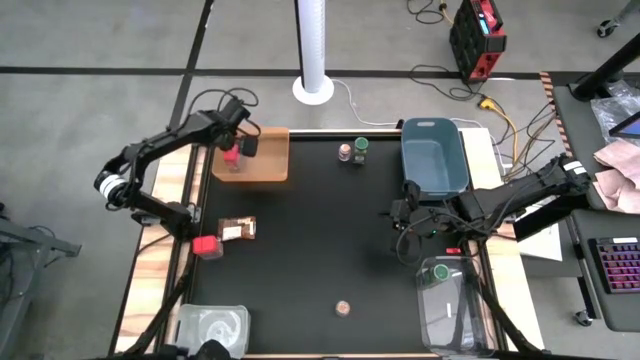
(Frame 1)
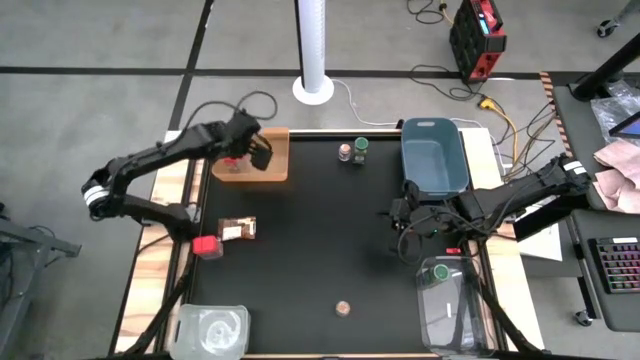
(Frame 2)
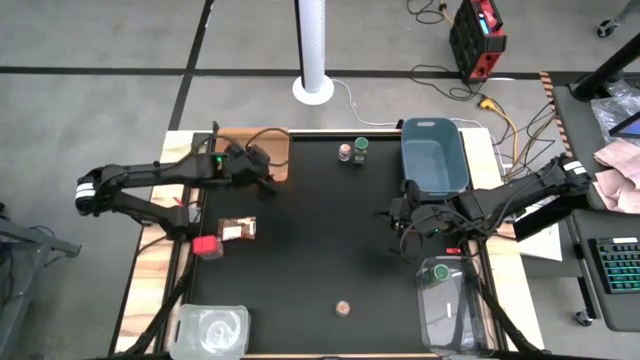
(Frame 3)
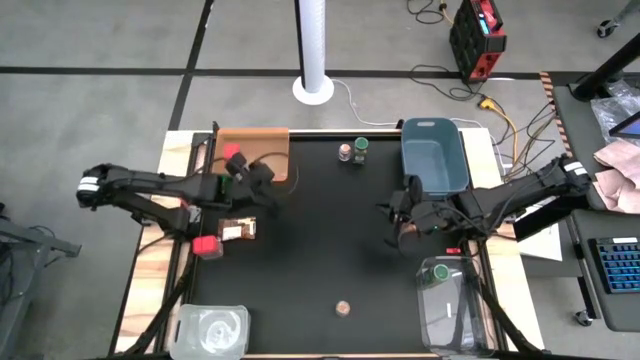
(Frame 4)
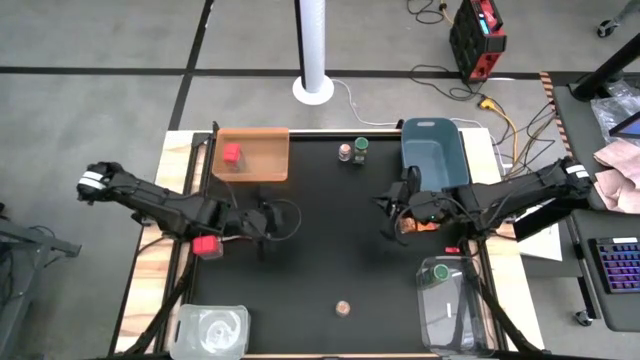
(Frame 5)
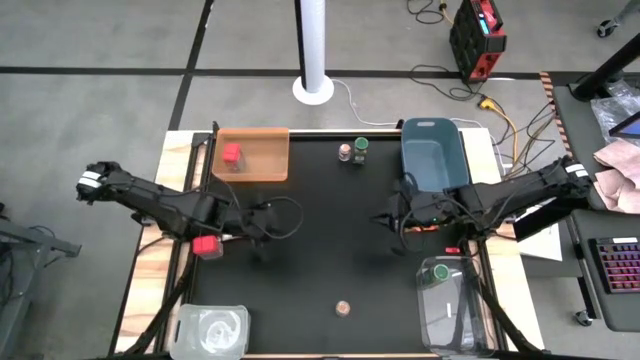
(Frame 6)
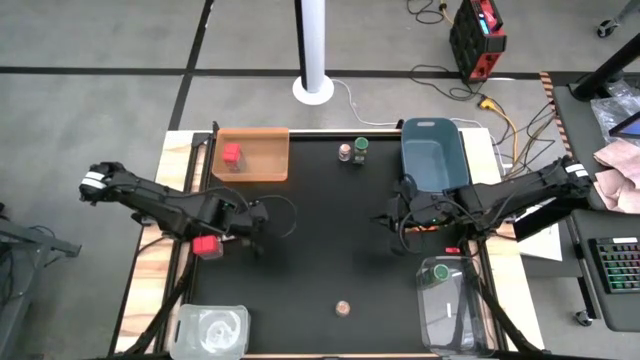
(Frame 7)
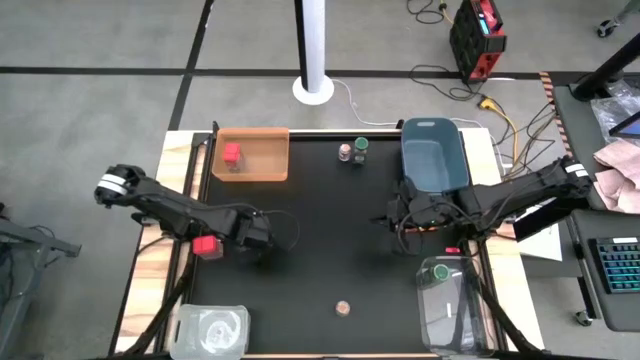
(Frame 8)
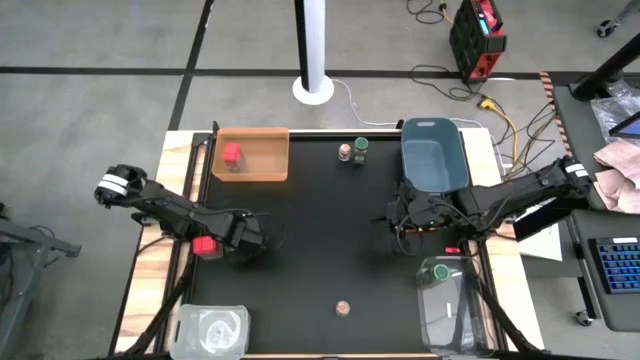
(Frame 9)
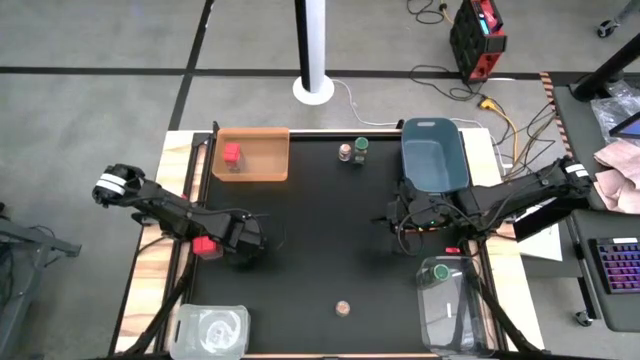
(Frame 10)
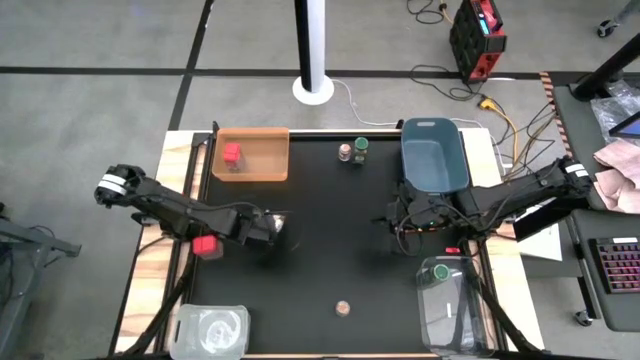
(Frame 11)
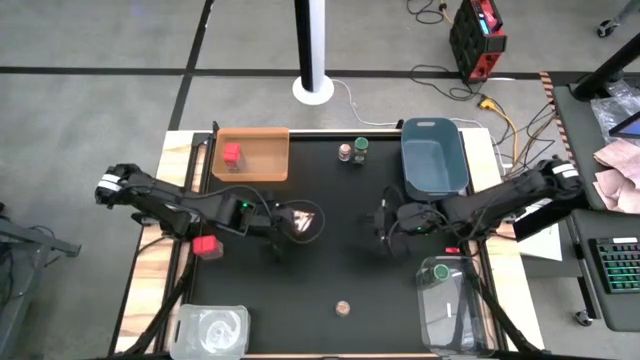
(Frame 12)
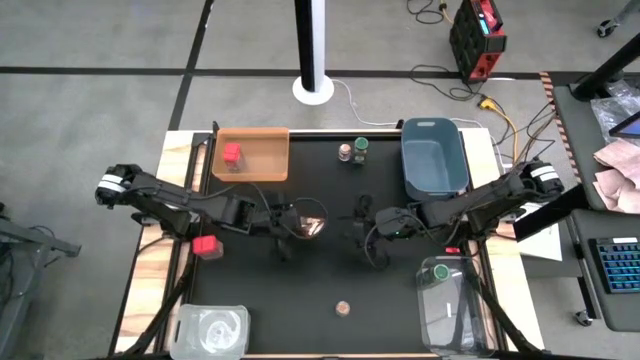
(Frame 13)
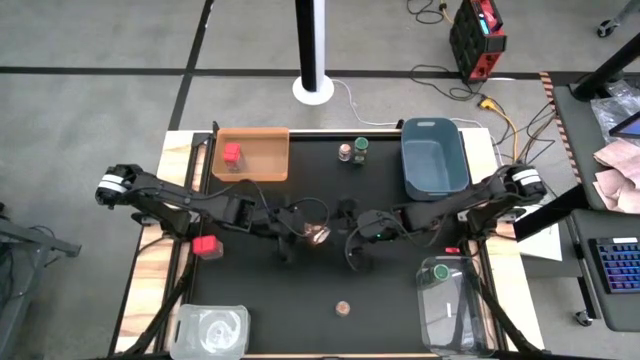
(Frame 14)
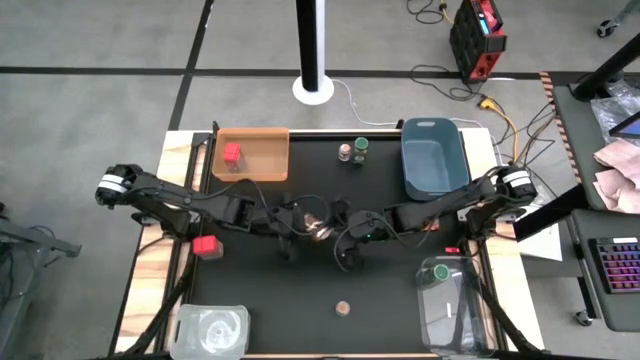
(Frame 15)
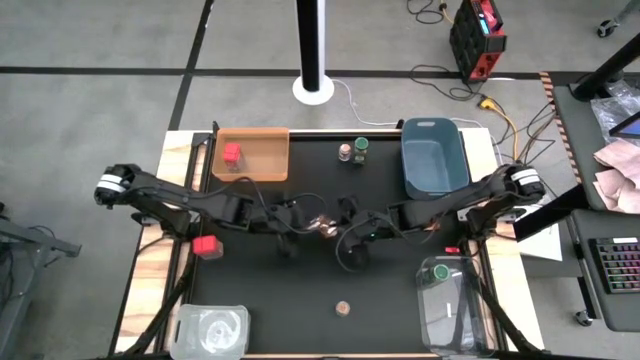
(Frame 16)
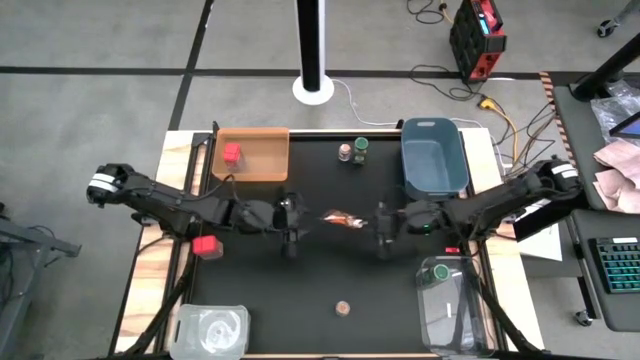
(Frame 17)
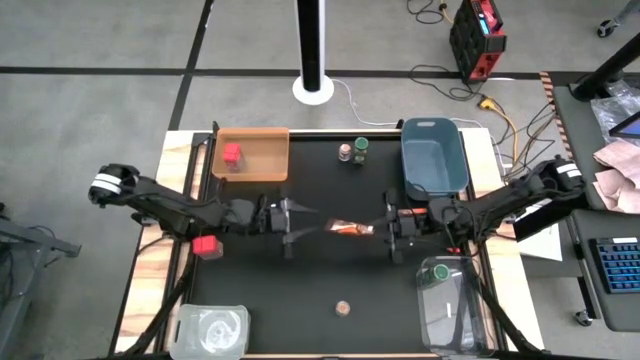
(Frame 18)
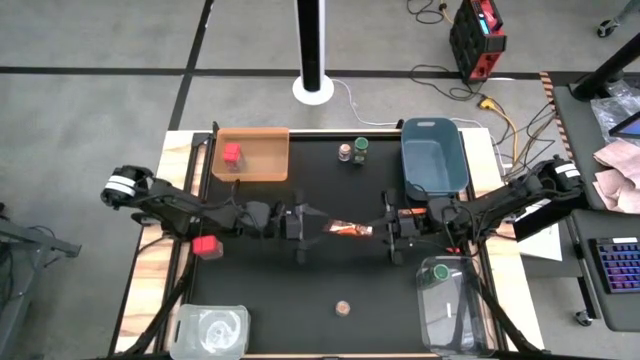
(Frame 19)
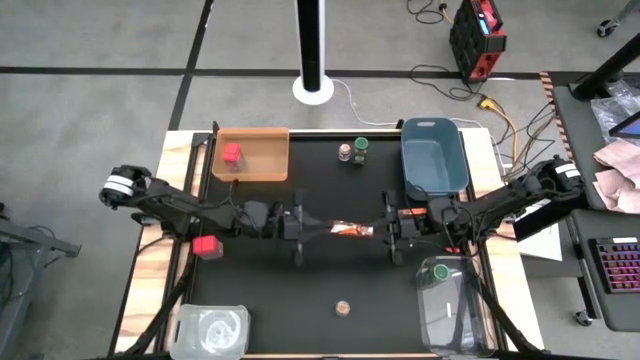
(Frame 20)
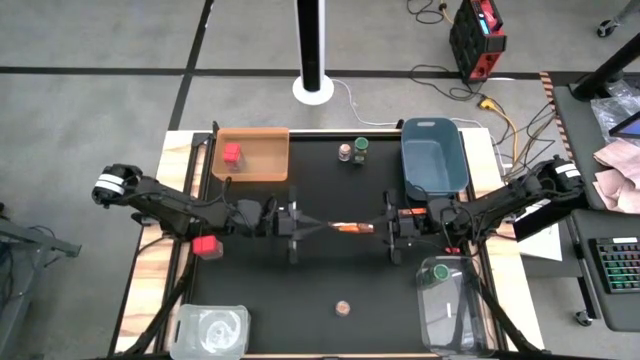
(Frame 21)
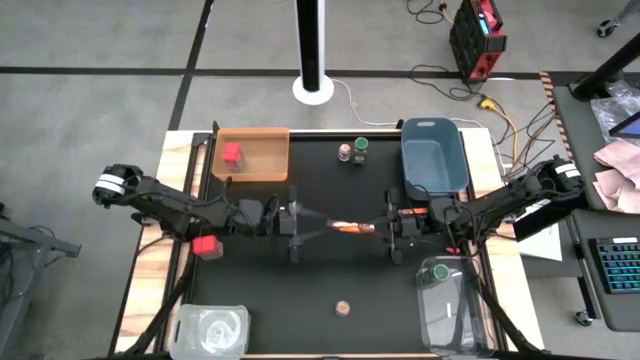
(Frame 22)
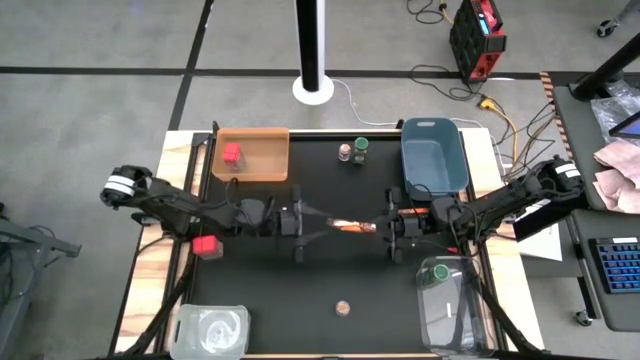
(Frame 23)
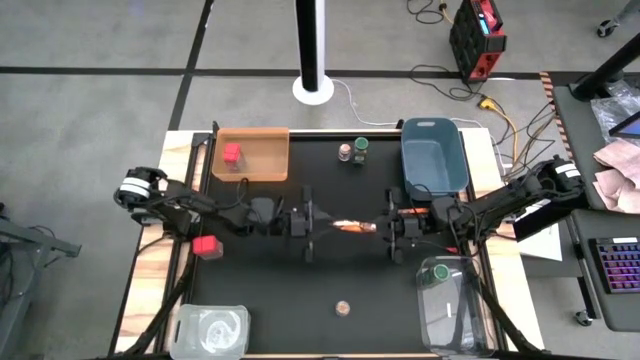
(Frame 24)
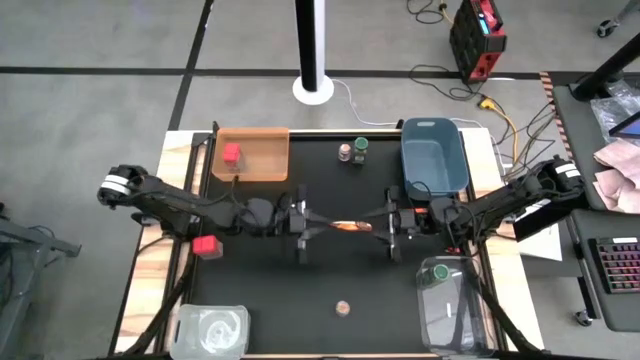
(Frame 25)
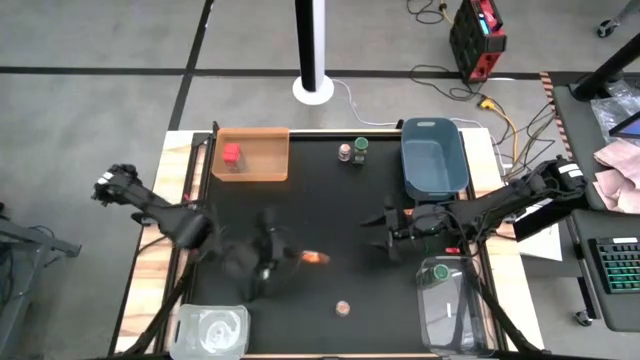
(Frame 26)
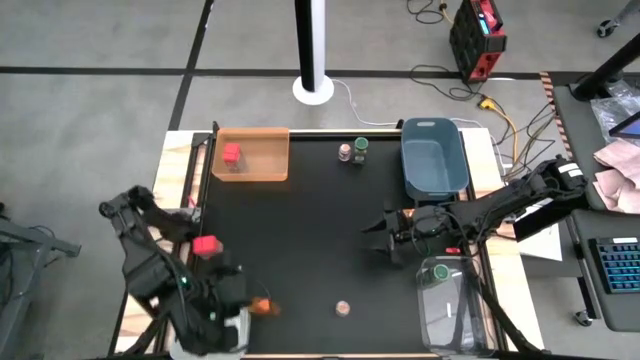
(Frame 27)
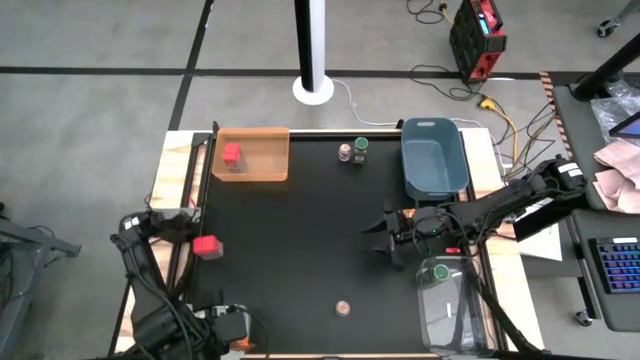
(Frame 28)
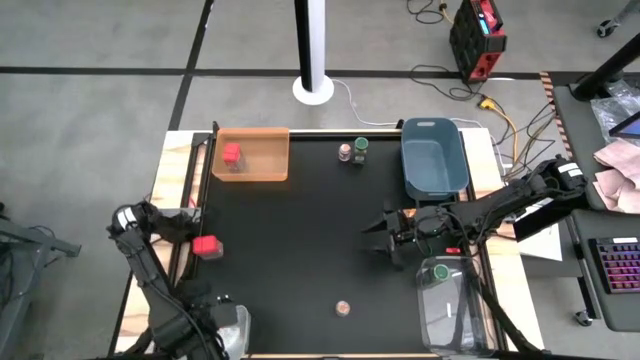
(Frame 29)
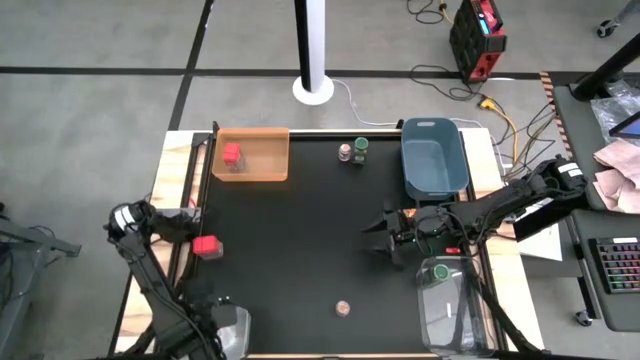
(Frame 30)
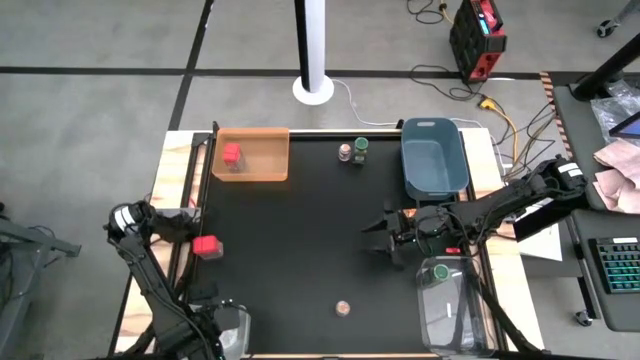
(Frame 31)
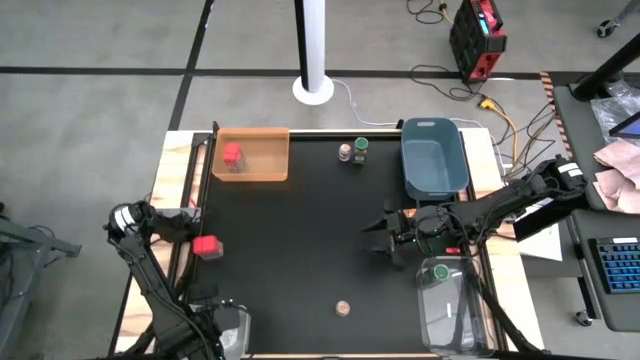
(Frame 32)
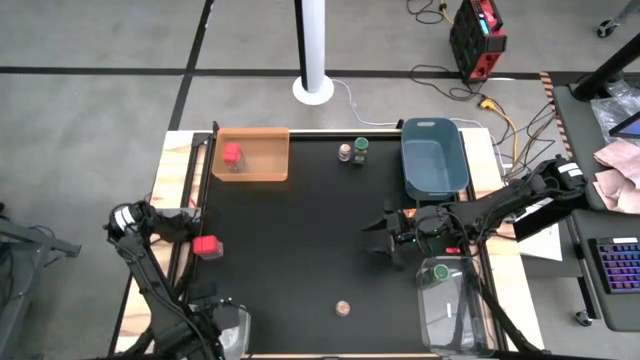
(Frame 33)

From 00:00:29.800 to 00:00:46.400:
Task: Sort spices by type
Put the left orange seasoning bag into the white bin

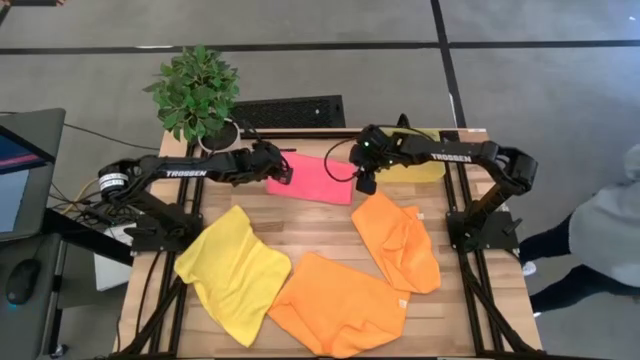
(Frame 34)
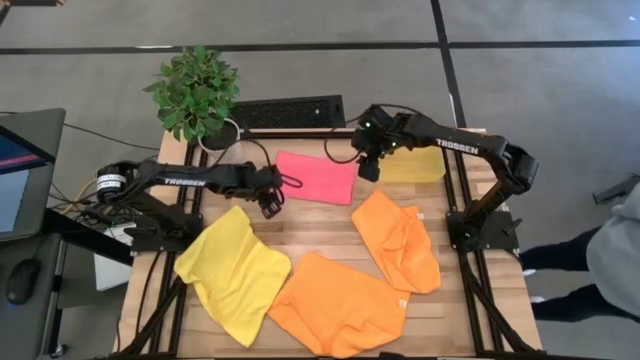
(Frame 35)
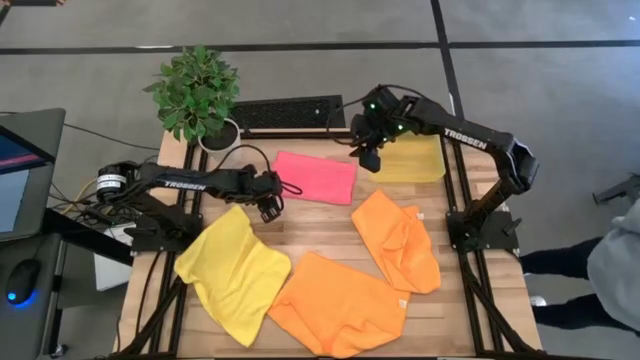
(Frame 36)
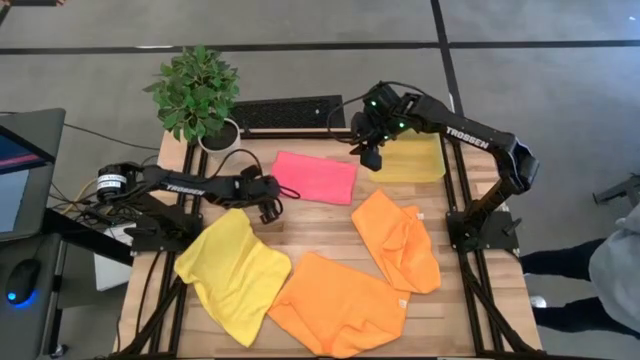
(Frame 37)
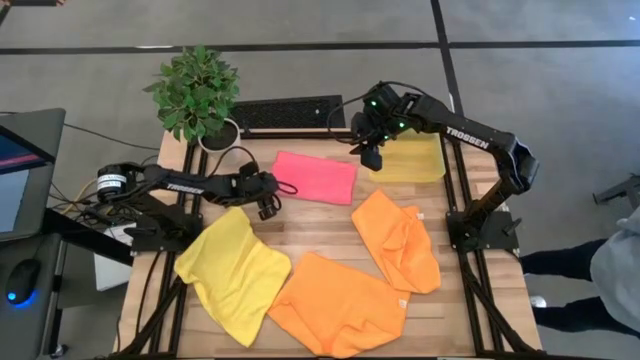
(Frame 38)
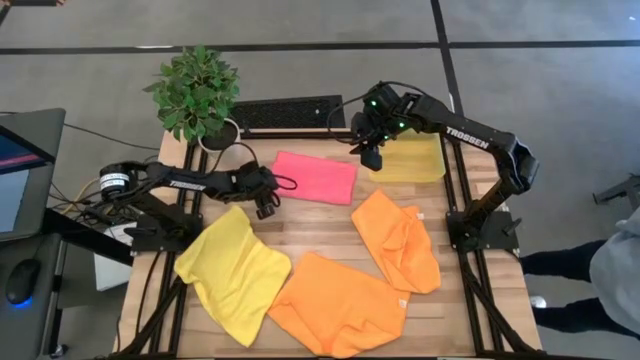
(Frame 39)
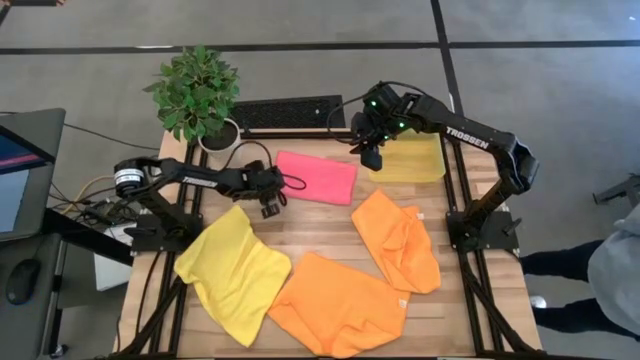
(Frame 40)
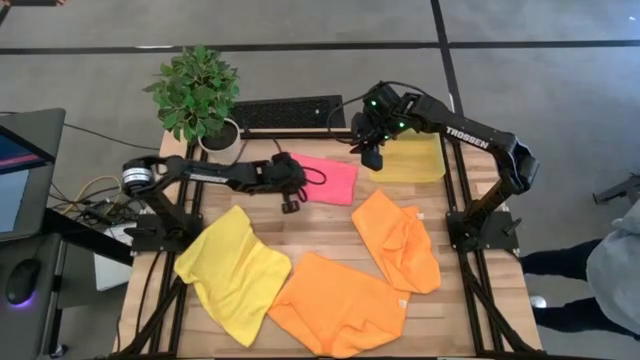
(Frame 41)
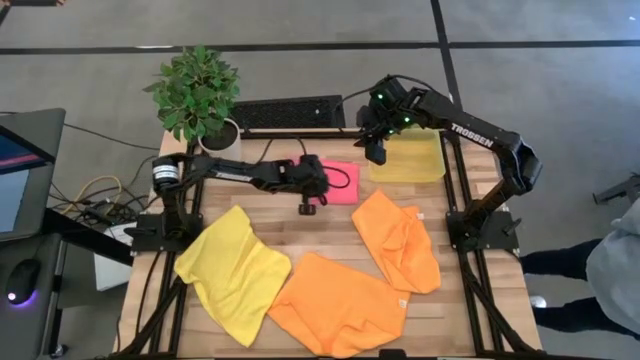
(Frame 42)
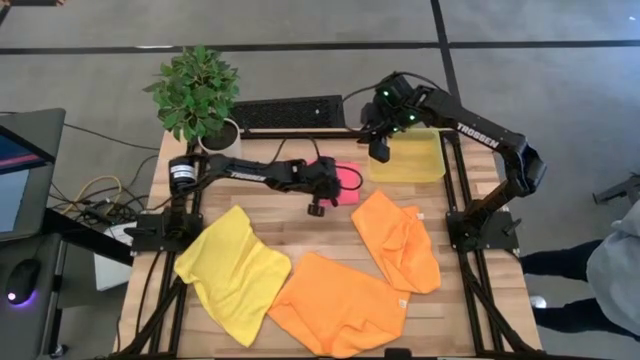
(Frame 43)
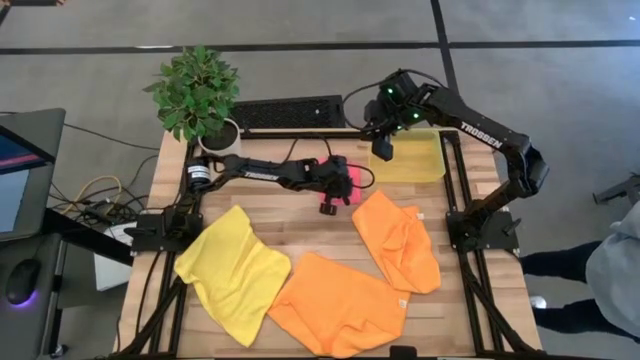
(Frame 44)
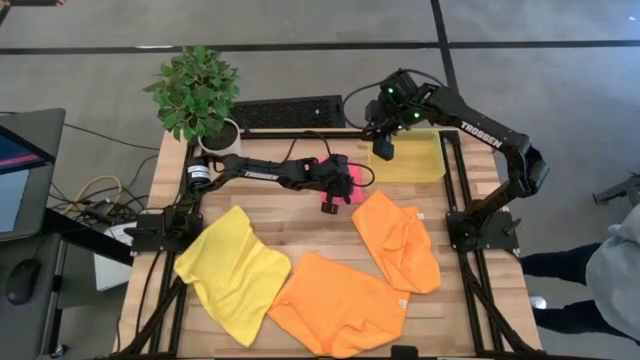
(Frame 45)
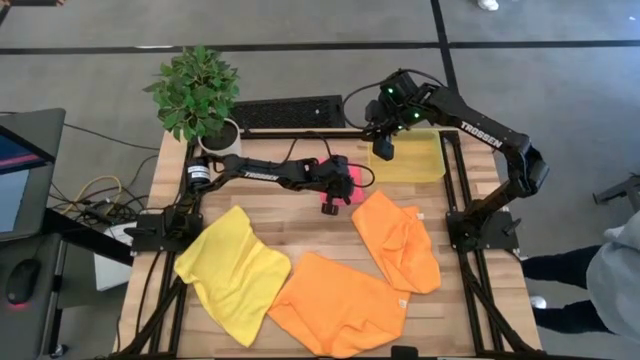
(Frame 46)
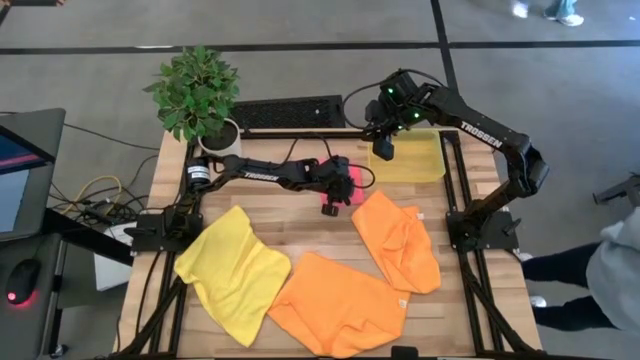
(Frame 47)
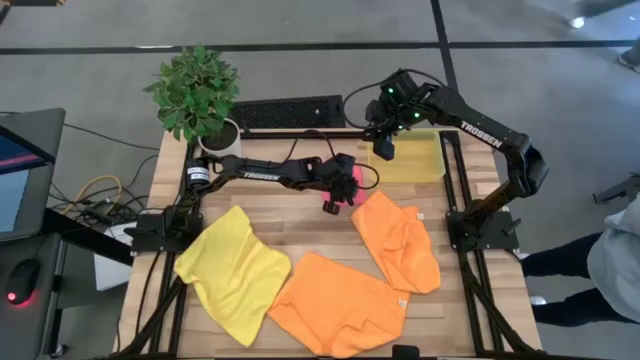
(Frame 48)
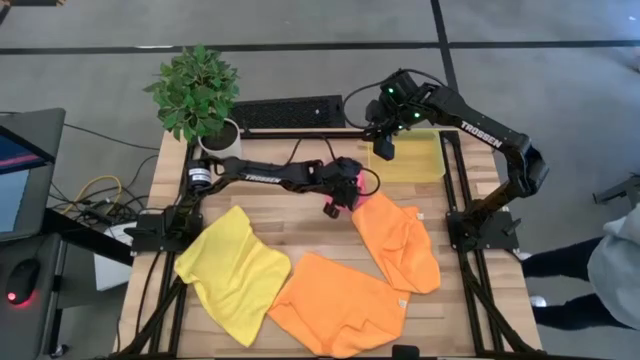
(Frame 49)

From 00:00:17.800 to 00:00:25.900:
Task: Fold microfiber towels
Fold the pink microfiber towel
